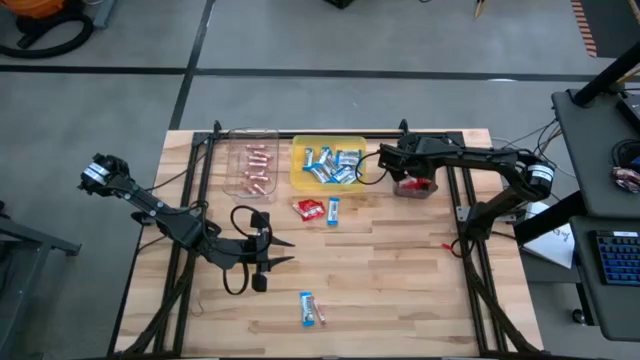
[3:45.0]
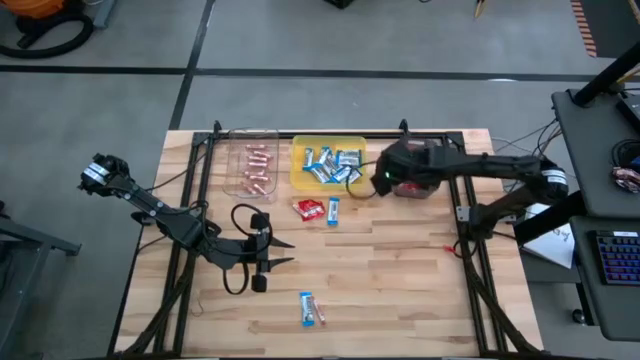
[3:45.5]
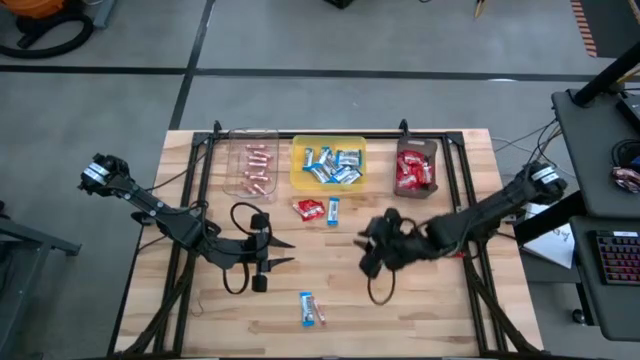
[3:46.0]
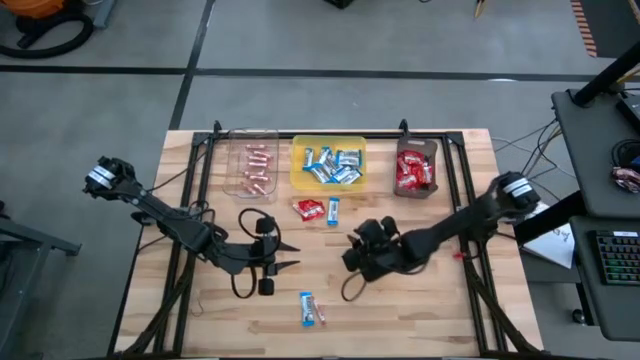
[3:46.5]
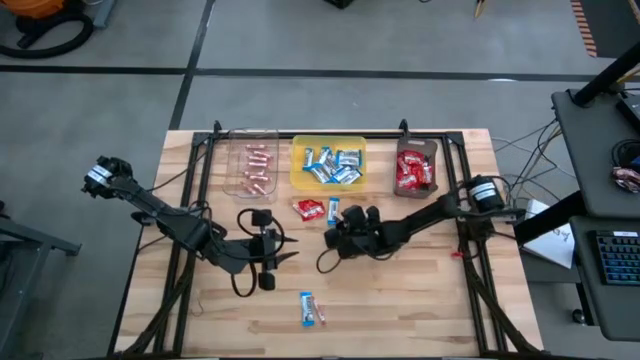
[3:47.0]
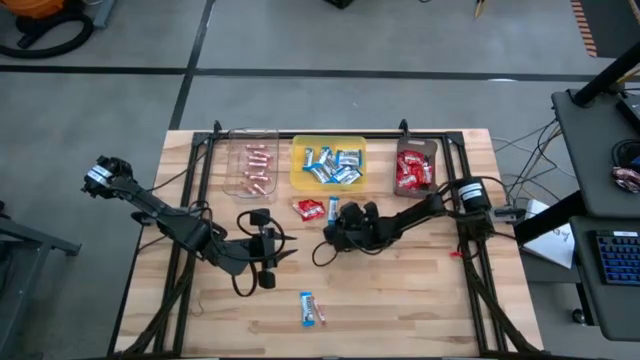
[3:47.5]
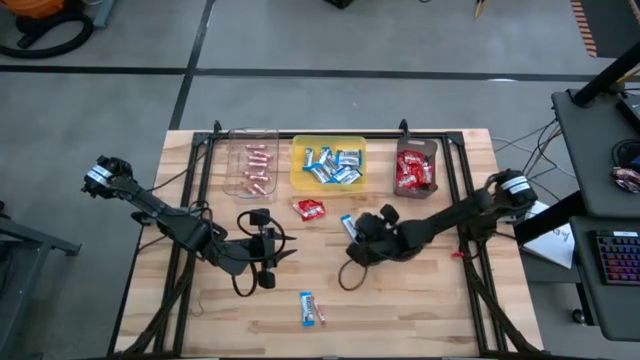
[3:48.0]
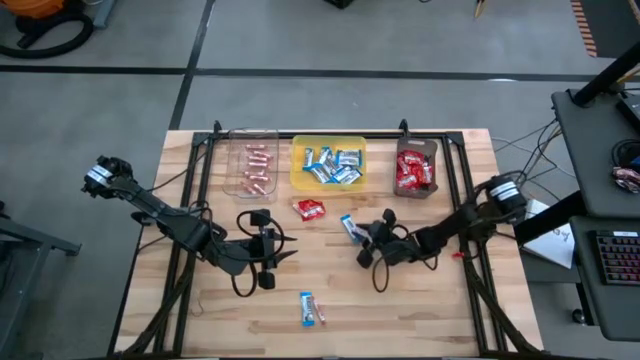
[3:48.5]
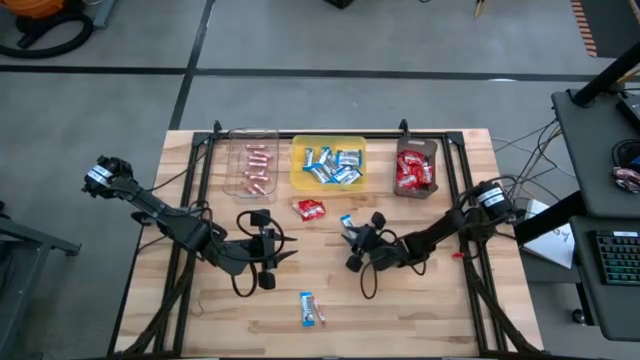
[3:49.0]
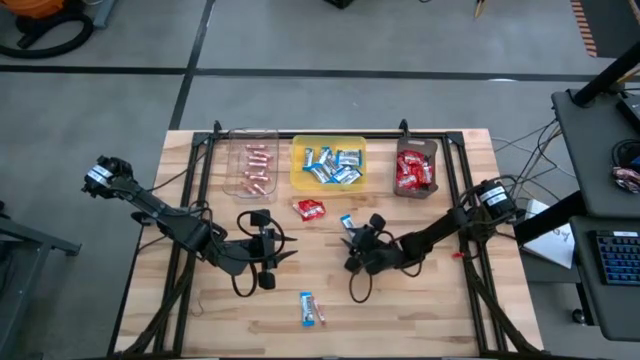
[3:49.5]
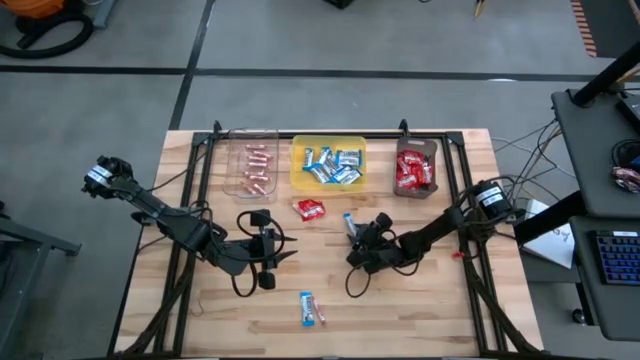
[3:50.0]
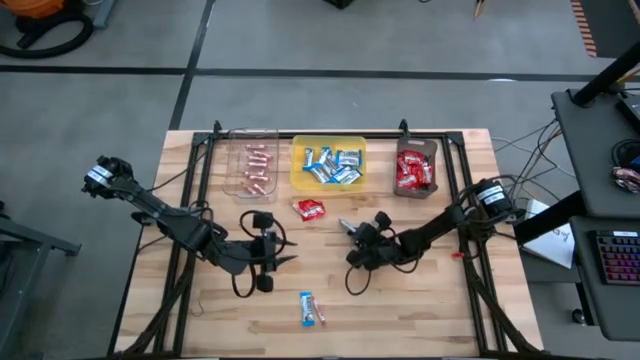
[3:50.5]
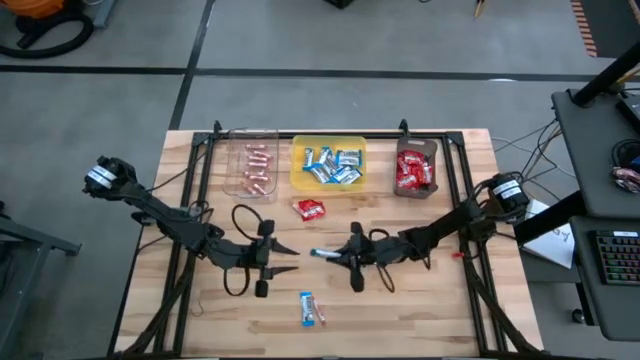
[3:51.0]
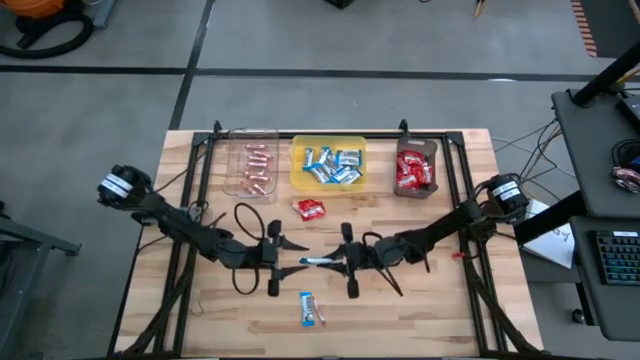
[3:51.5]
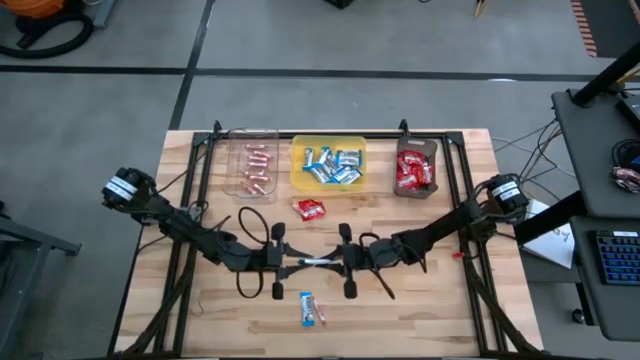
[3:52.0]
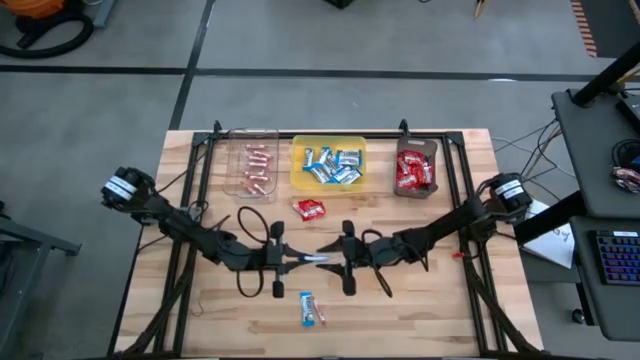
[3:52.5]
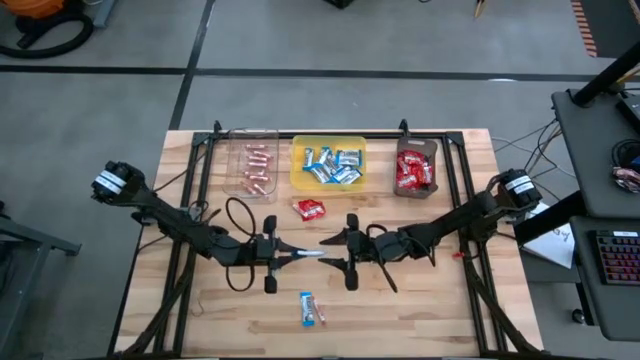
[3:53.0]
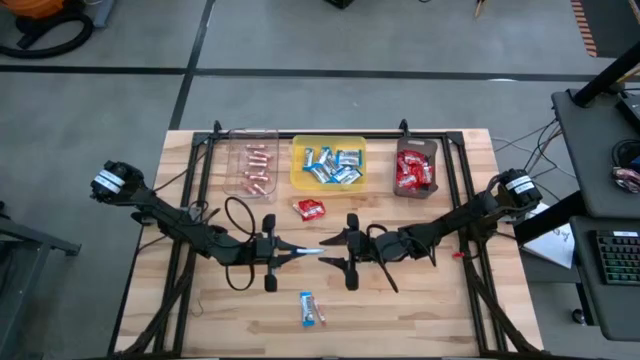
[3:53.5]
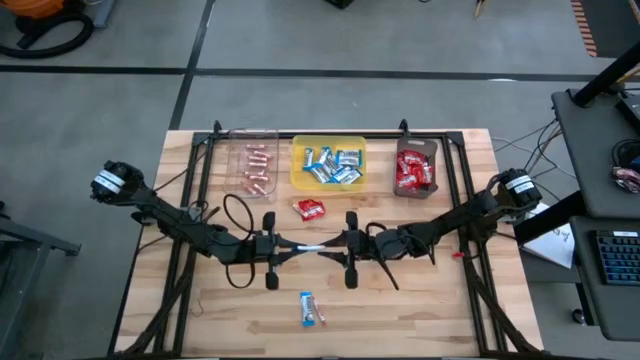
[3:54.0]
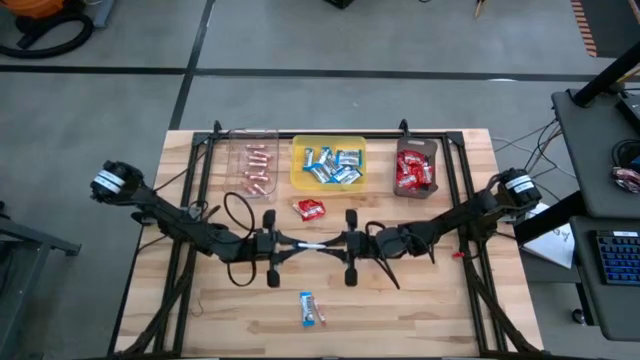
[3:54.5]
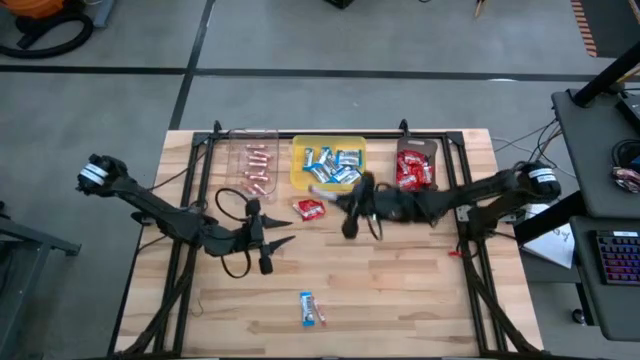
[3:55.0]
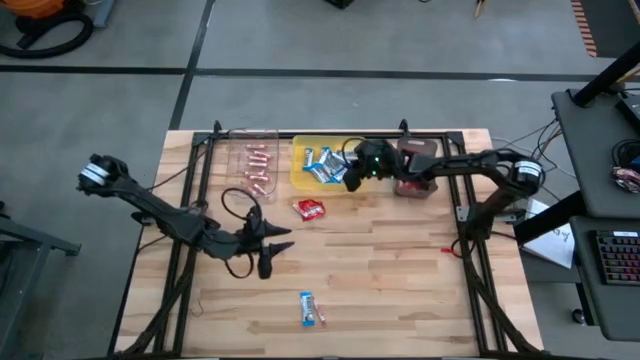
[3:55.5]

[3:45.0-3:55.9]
Task: Sort candy
Put the white chocolate into the yellow bin

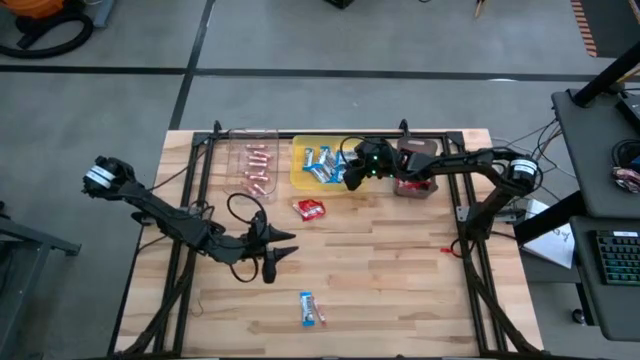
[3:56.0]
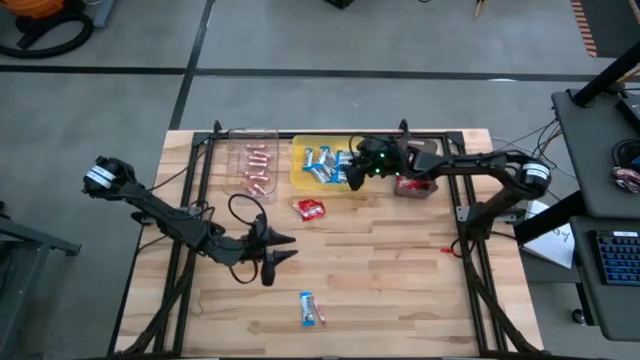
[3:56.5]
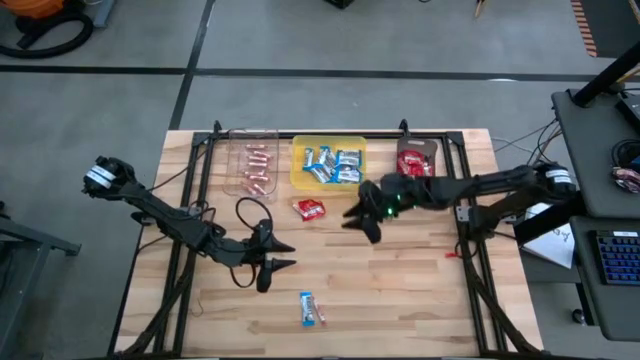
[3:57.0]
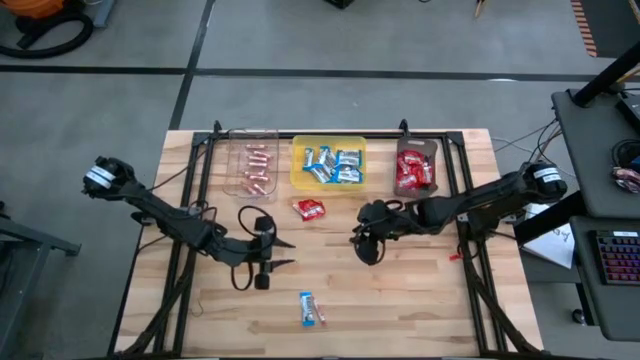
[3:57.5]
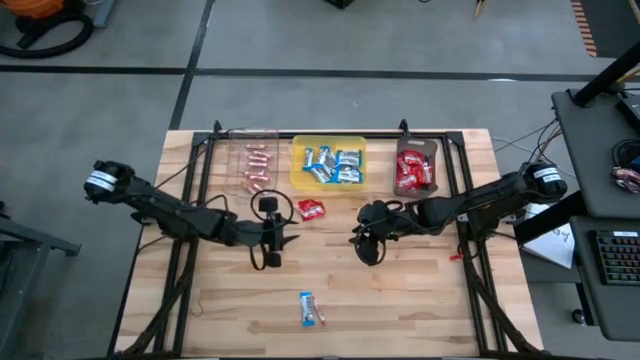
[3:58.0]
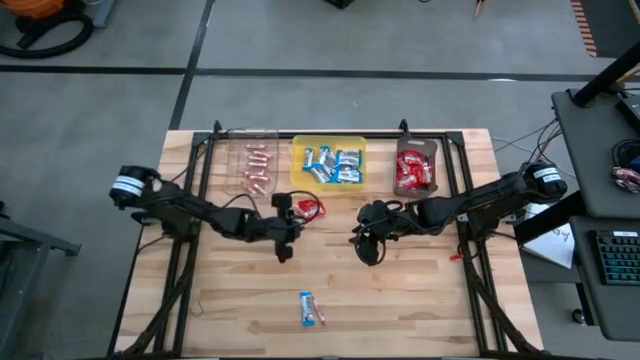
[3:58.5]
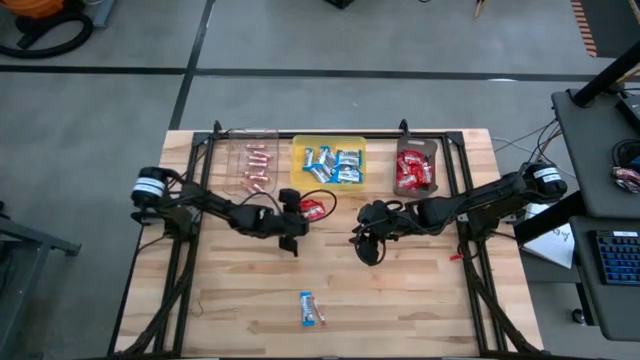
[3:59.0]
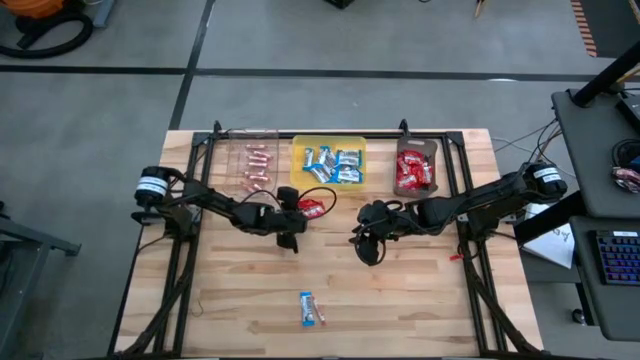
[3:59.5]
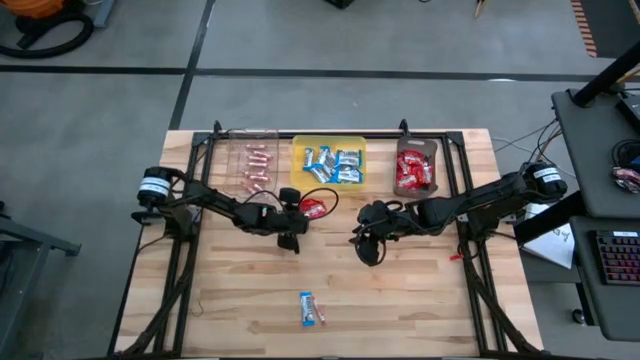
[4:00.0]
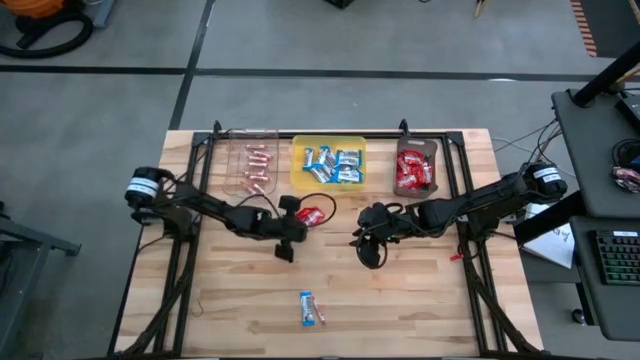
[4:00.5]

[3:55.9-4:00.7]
Put the orange candy into the transparent bin

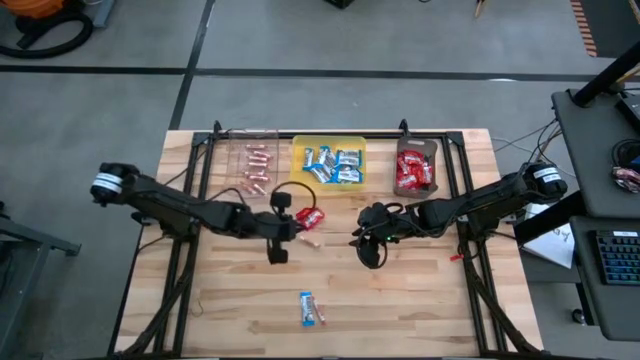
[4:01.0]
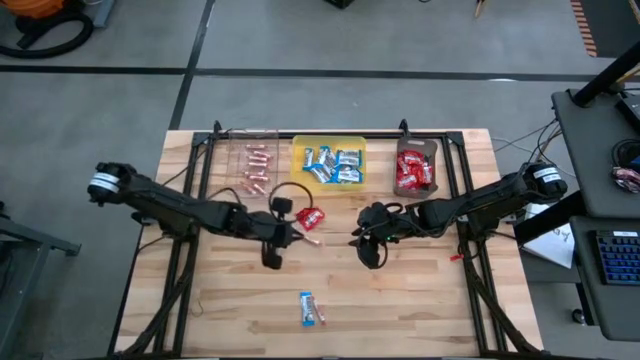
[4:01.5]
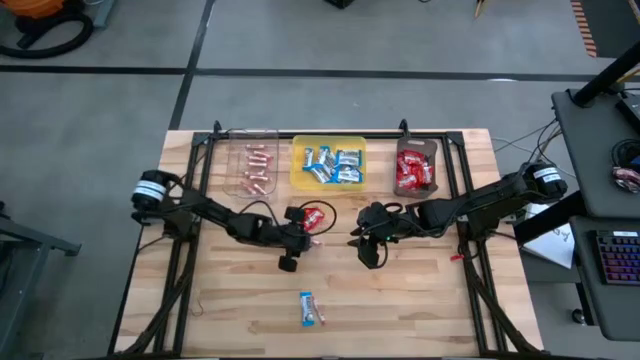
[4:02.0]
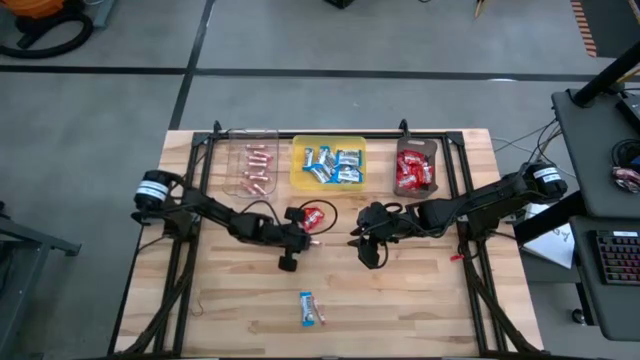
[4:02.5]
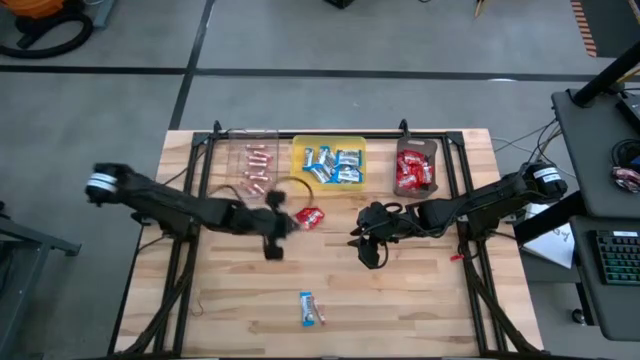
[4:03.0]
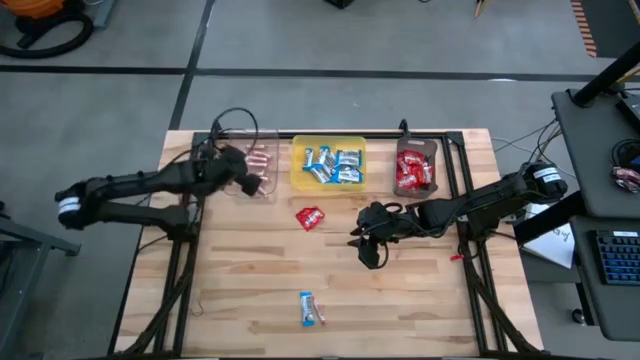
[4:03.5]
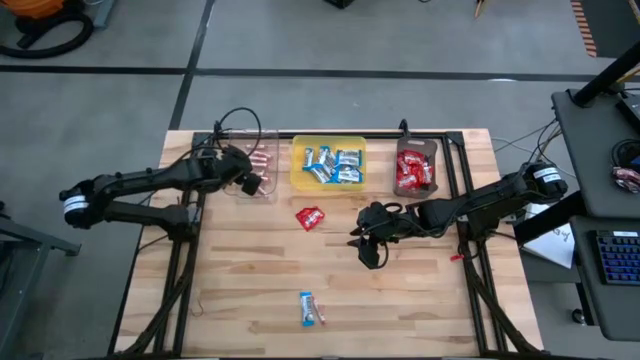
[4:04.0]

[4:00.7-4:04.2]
Put the orange candy into the transparent bin

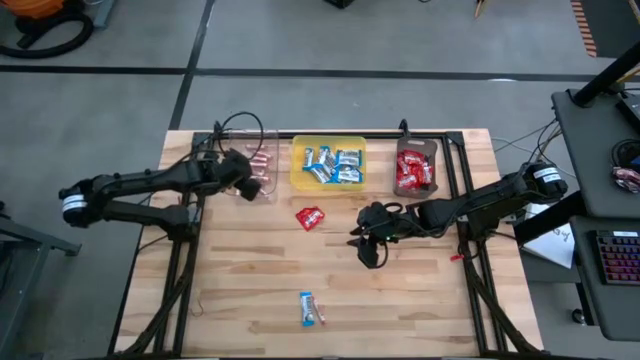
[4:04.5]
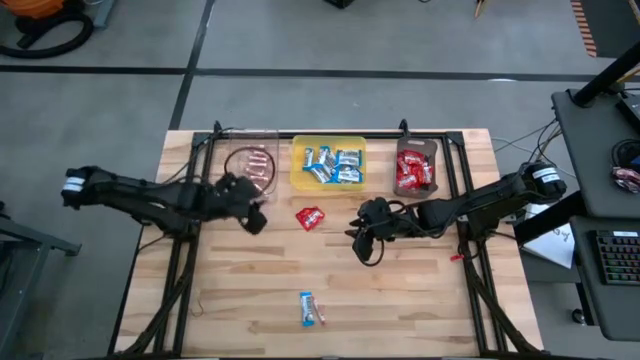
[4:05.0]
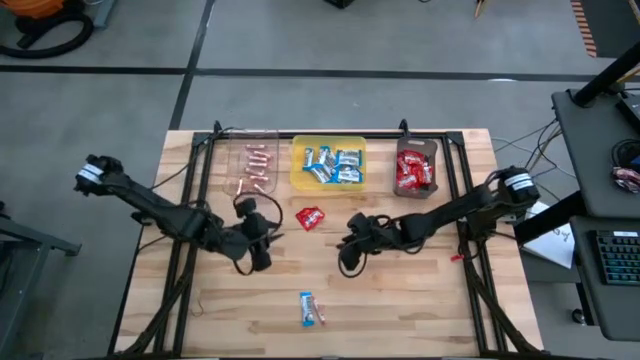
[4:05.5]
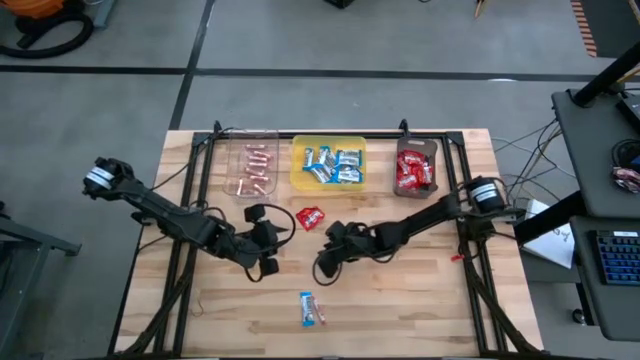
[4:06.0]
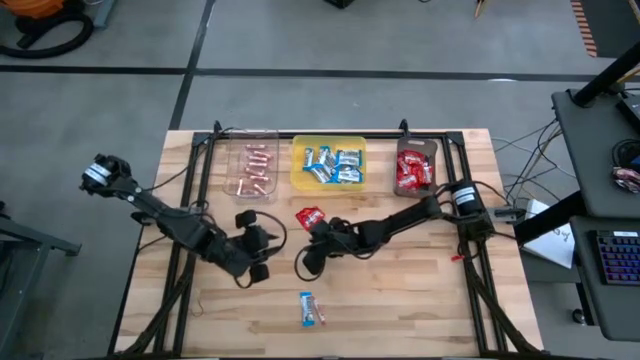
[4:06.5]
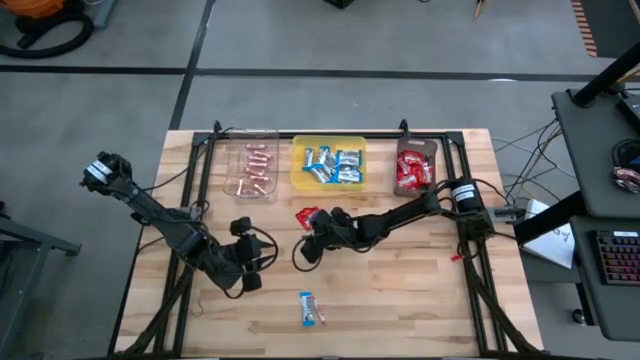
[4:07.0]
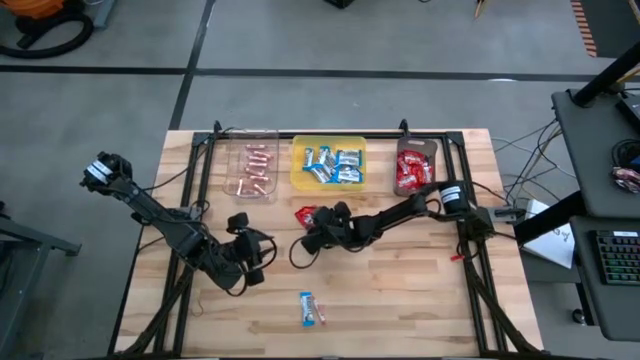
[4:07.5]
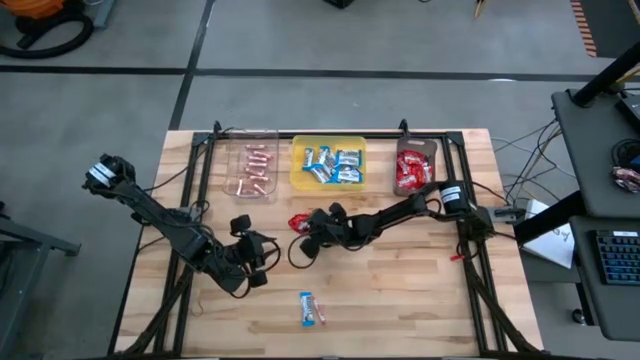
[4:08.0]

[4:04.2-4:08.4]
Put the red candy into the black bin
